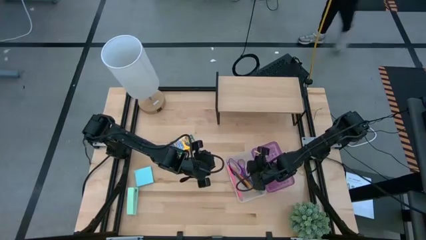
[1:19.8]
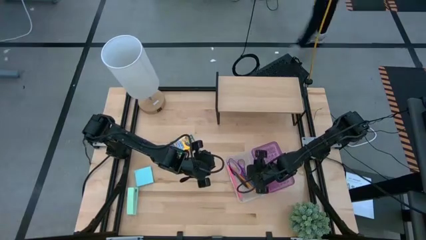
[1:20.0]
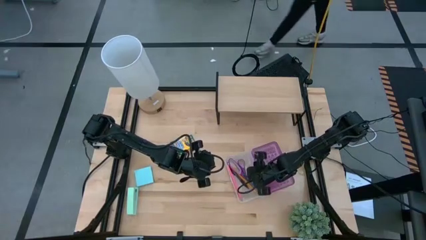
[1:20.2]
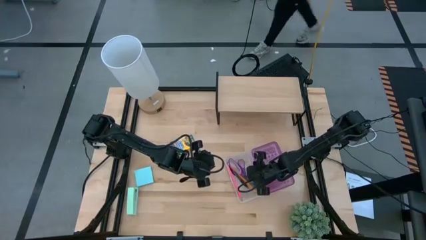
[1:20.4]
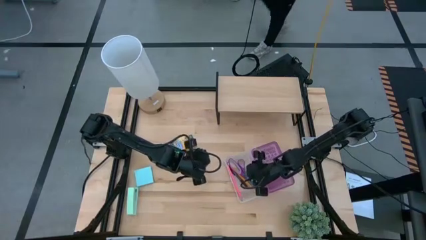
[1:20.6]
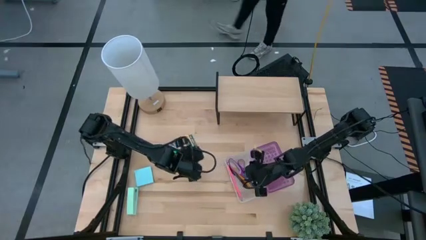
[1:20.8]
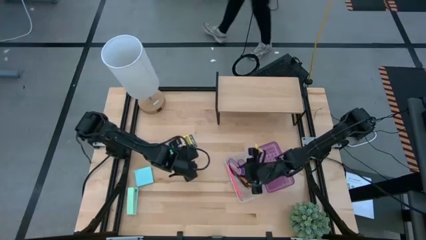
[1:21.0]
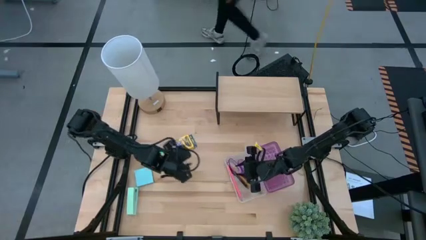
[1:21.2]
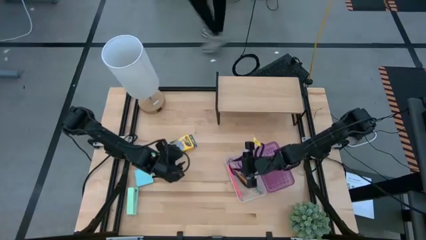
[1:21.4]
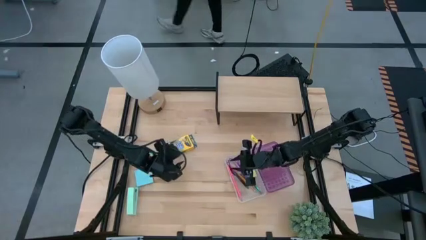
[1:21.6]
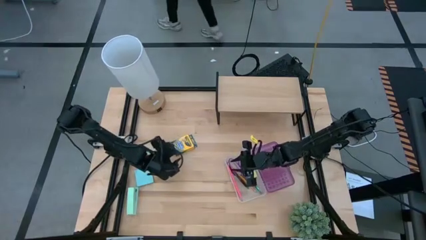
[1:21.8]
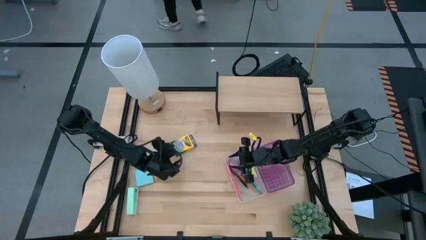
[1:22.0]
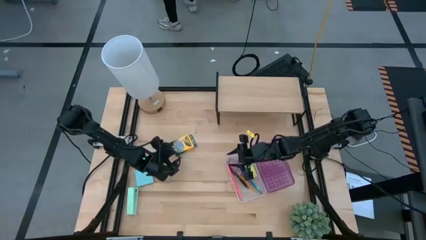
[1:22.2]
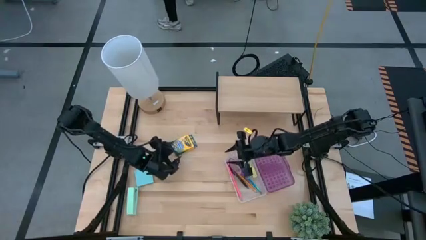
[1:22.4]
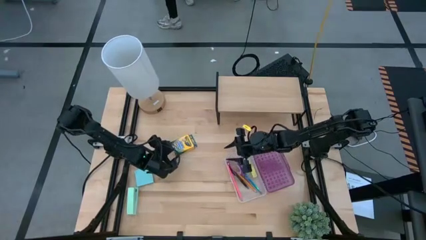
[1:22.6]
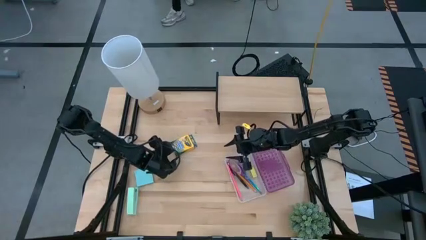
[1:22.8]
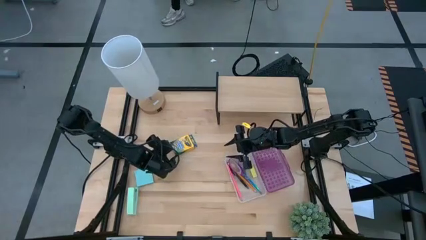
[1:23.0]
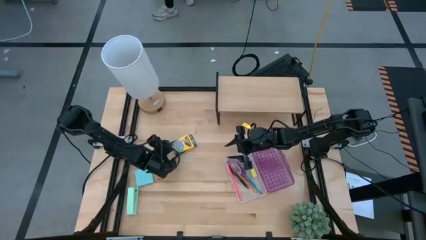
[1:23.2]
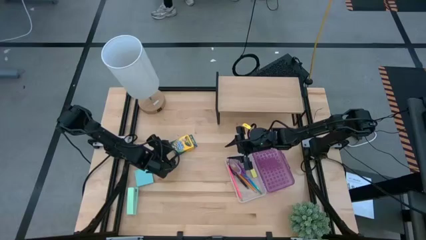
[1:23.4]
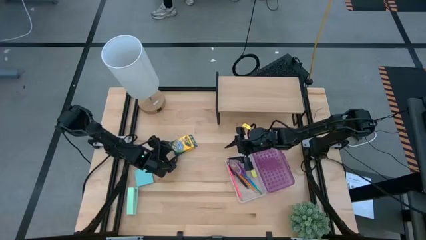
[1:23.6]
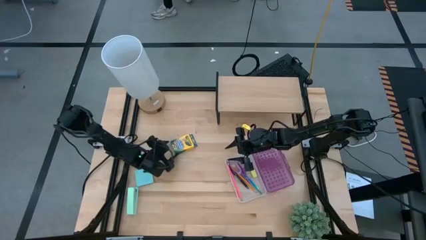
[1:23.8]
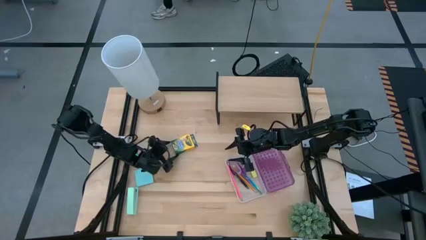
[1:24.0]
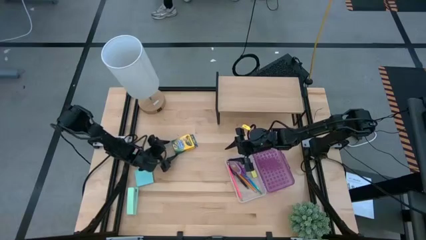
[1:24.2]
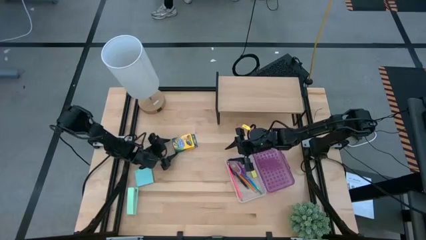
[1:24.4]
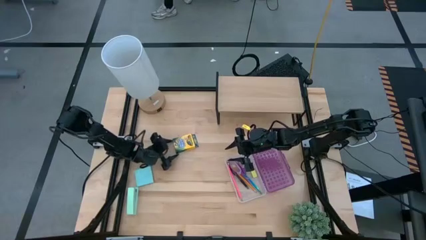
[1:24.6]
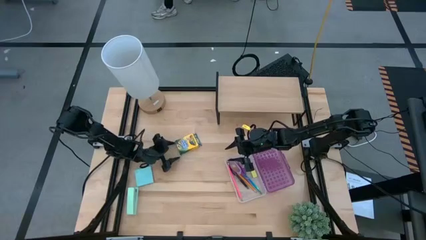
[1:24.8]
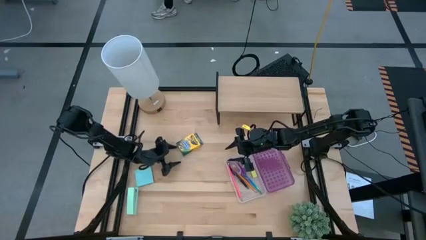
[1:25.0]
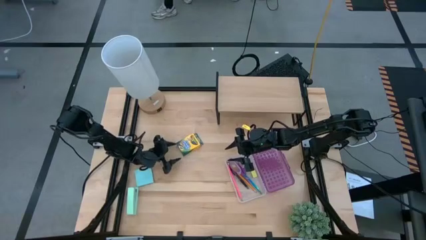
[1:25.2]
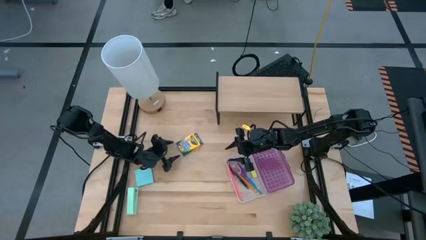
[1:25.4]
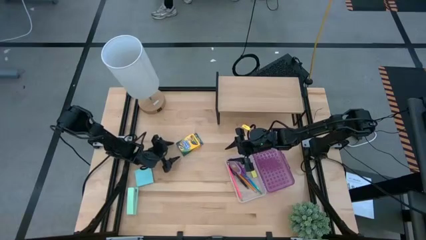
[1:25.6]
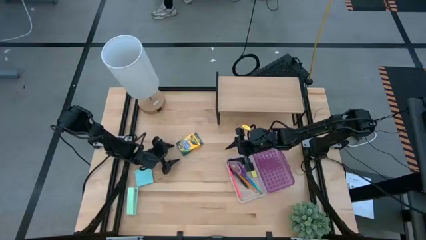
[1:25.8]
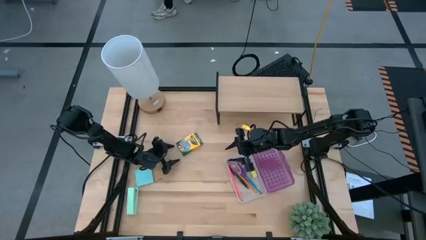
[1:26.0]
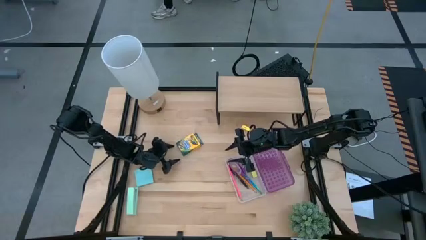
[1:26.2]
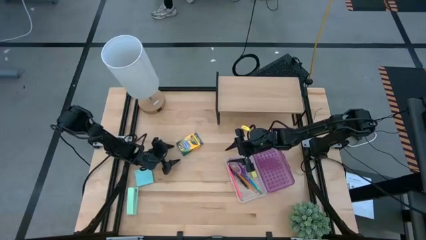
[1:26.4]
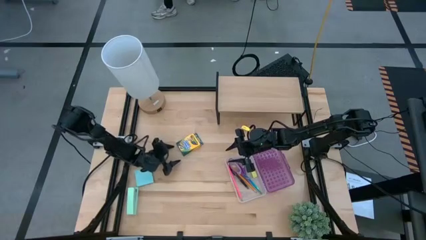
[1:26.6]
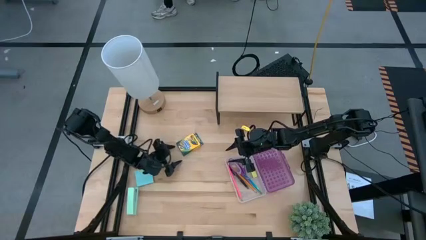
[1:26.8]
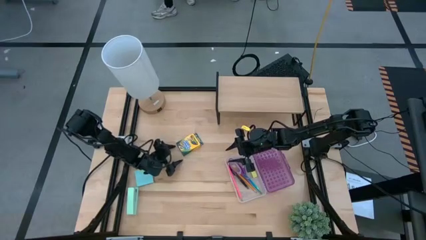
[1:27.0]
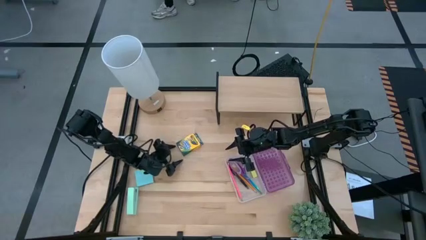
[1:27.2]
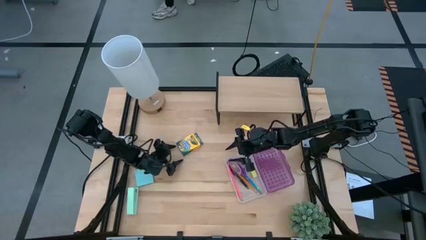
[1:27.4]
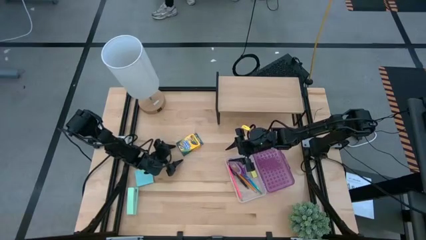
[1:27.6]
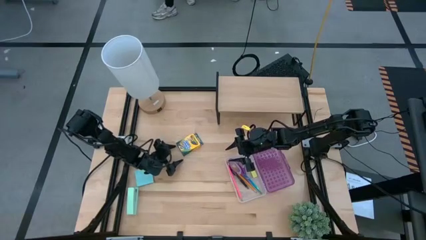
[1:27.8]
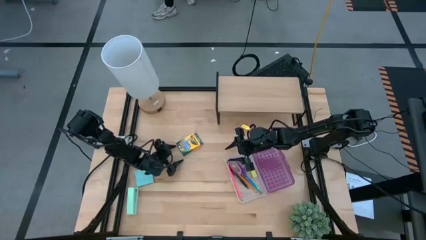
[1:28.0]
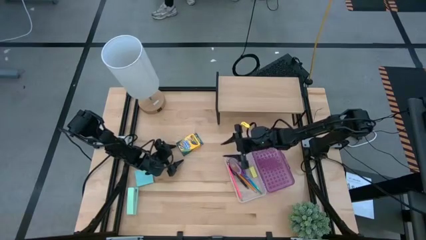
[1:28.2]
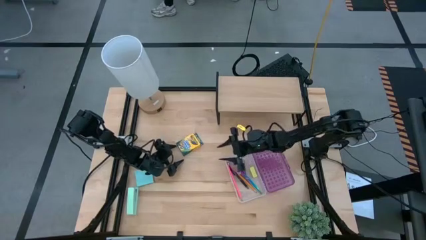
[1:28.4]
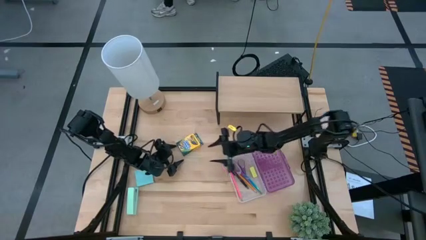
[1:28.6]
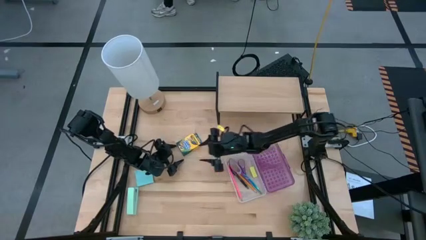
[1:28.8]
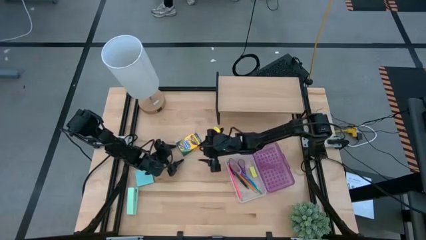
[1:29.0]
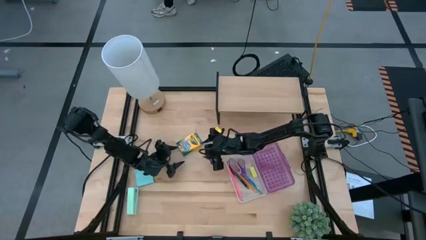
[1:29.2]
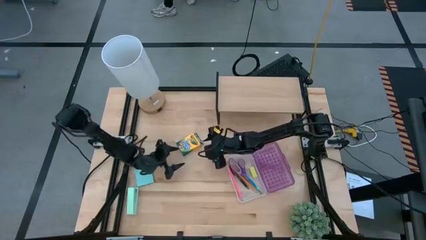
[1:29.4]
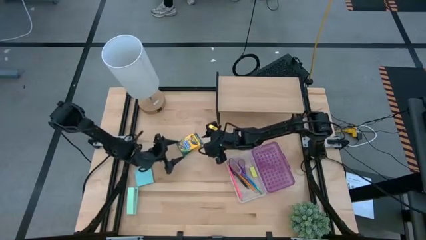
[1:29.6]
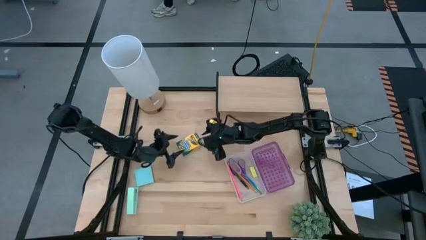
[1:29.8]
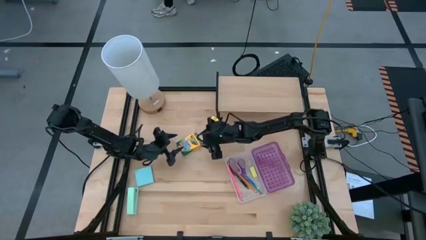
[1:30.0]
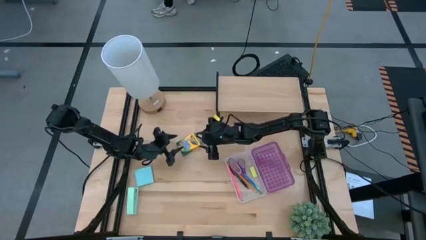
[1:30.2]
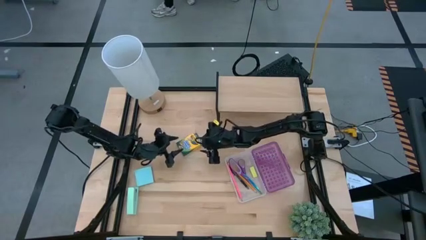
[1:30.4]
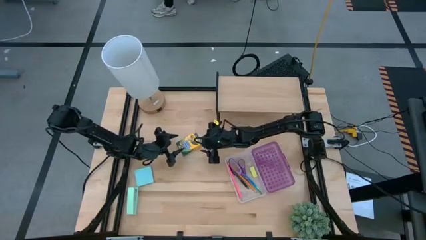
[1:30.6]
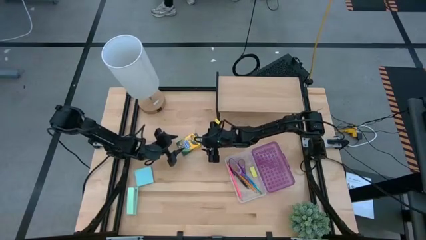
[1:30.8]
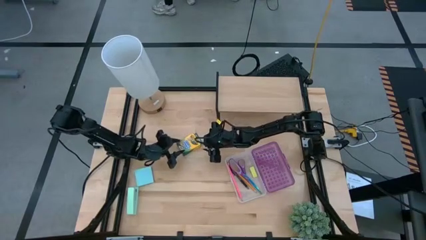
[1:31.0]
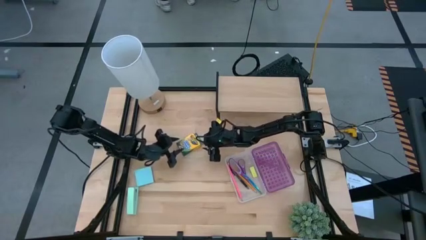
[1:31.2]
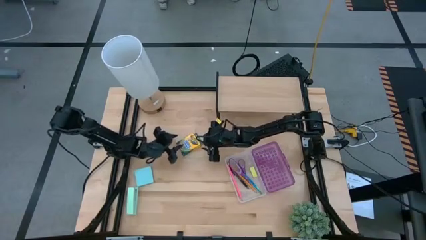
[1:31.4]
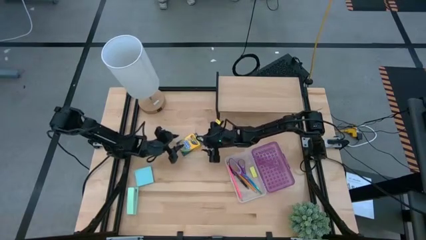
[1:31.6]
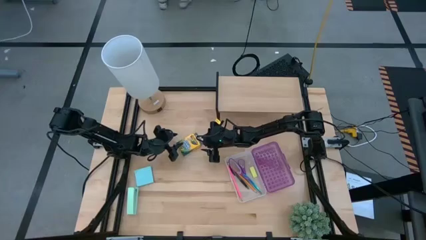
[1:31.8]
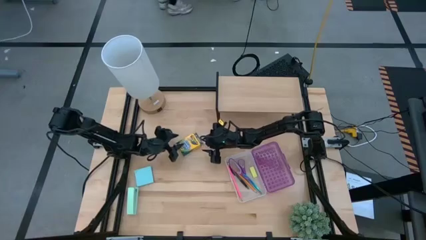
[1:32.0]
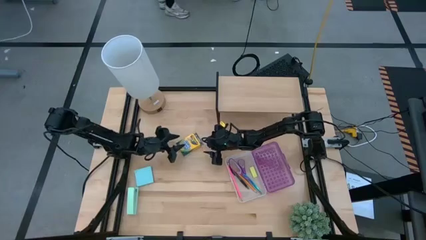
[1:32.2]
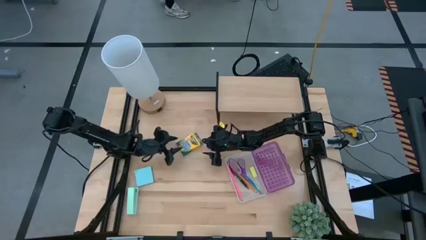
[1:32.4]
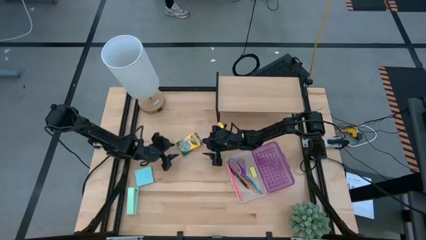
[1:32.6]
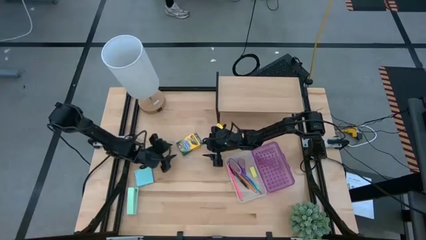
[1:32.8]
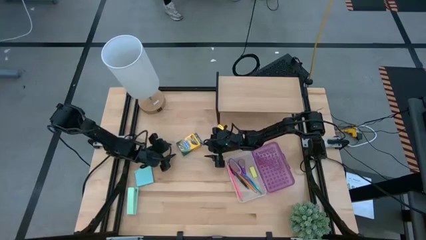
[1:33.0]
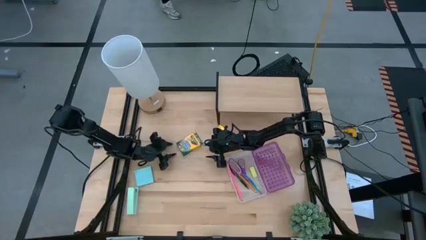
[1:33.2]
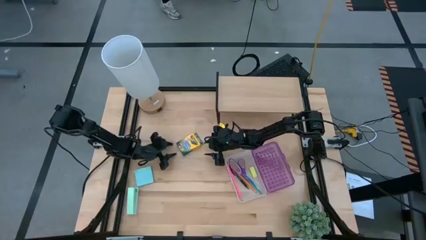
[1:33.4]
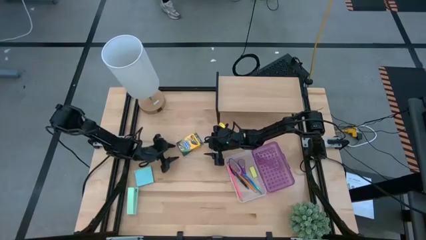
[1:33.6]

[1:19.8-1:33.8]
Task: Pack school essentials
Put the yellow crayon box into the purple supply box
